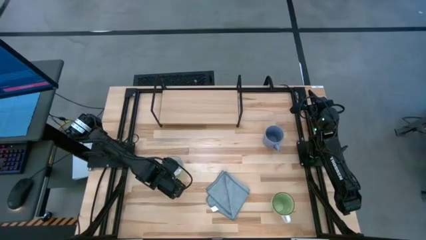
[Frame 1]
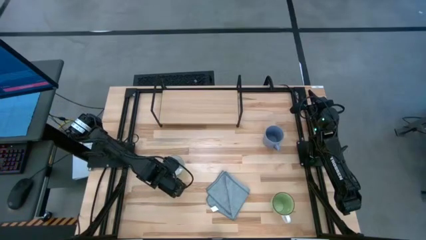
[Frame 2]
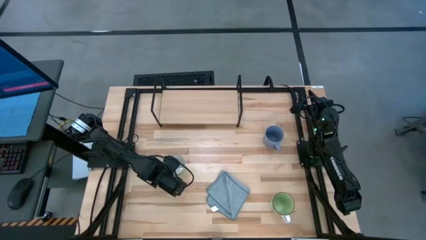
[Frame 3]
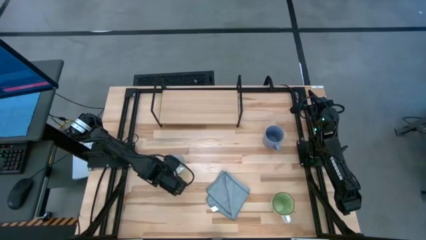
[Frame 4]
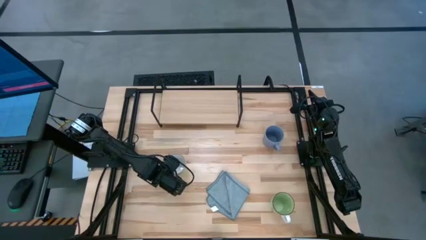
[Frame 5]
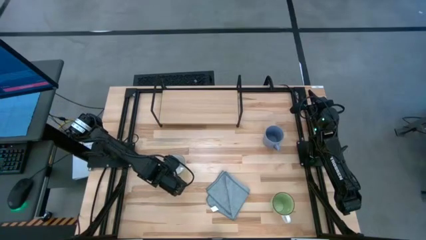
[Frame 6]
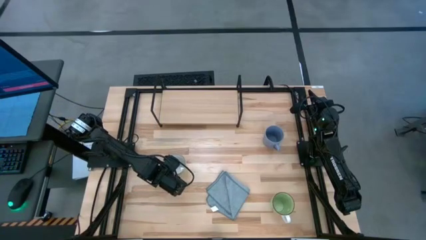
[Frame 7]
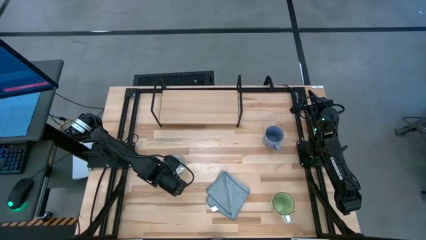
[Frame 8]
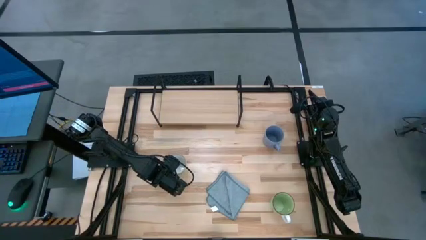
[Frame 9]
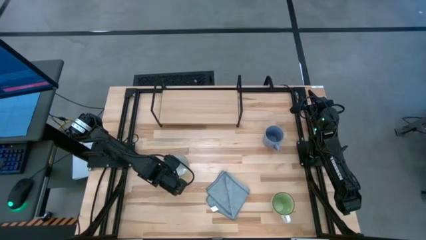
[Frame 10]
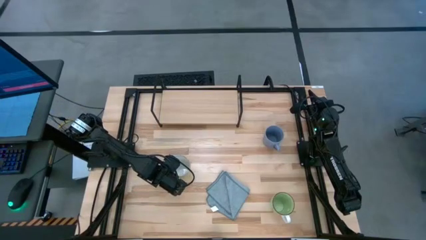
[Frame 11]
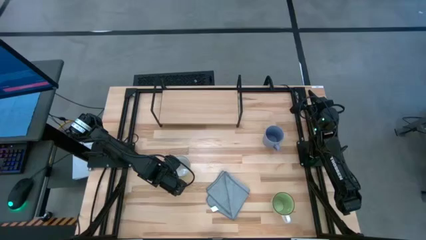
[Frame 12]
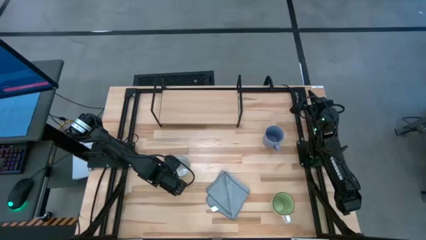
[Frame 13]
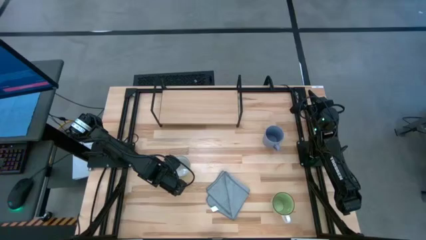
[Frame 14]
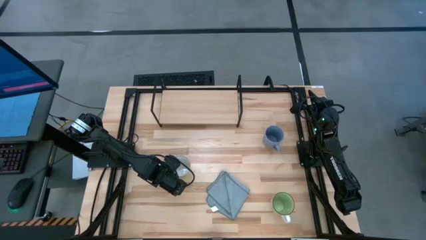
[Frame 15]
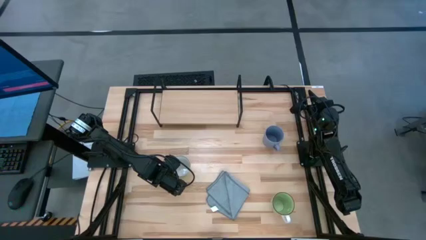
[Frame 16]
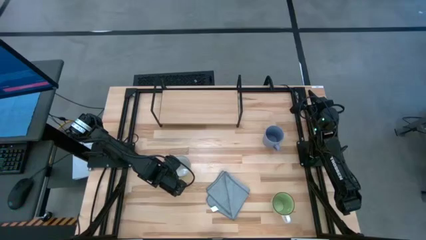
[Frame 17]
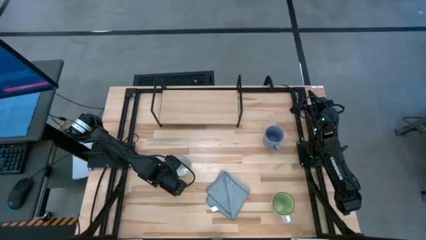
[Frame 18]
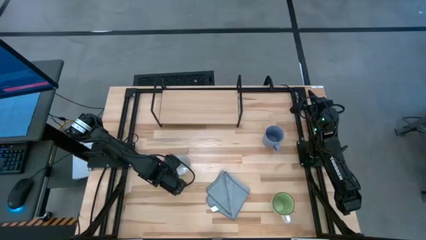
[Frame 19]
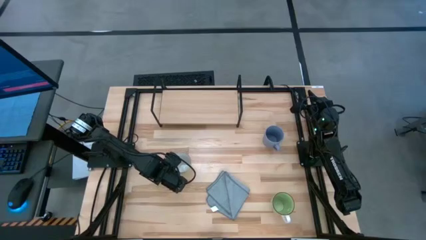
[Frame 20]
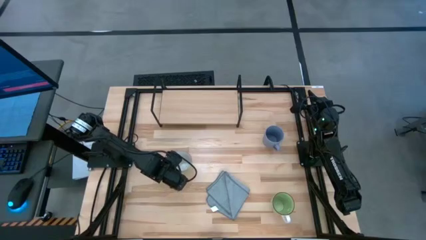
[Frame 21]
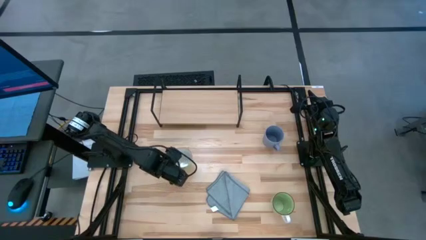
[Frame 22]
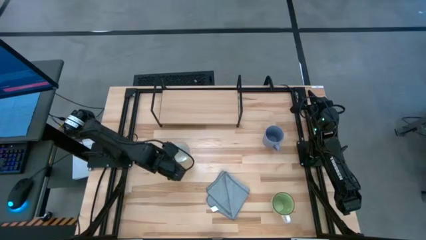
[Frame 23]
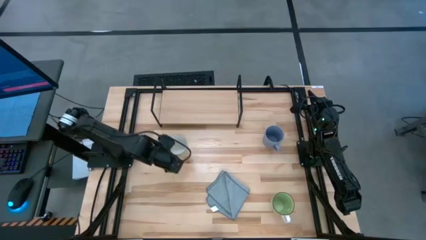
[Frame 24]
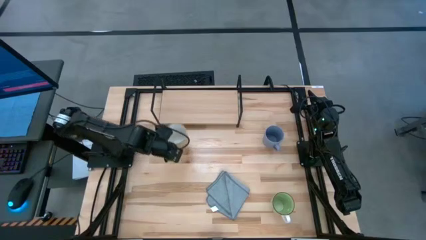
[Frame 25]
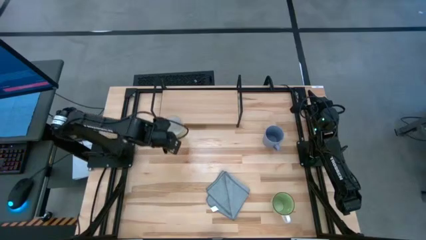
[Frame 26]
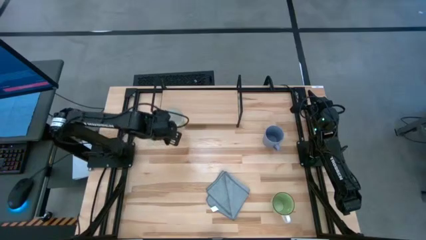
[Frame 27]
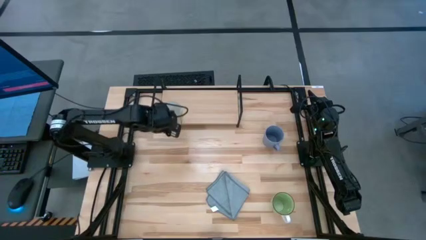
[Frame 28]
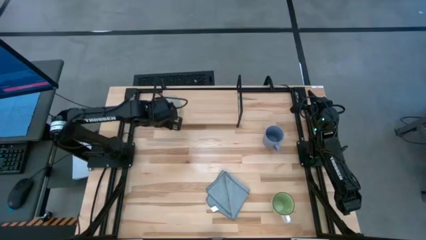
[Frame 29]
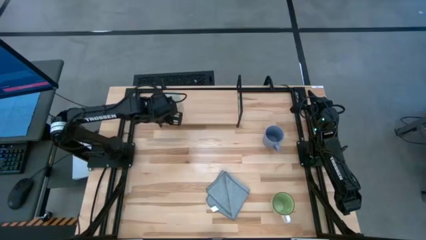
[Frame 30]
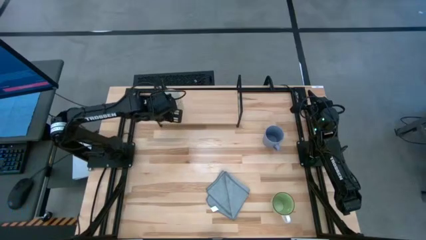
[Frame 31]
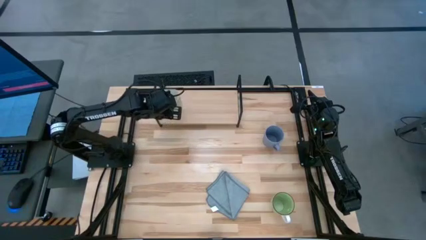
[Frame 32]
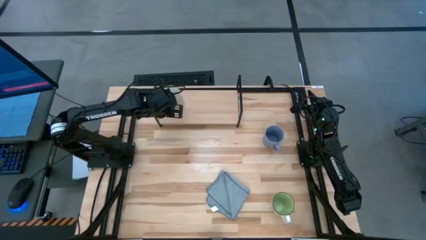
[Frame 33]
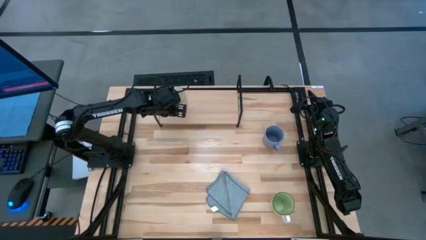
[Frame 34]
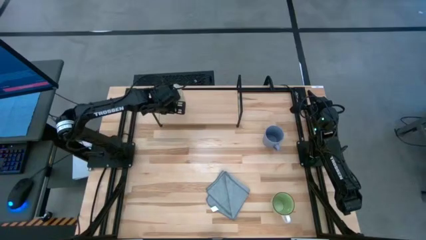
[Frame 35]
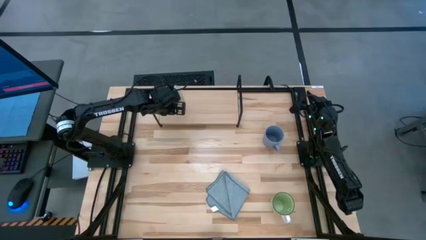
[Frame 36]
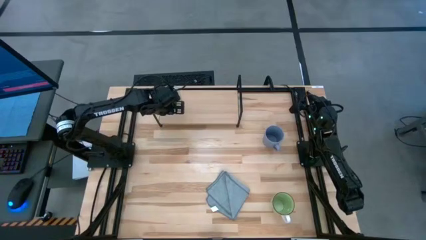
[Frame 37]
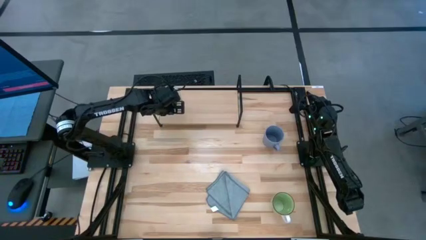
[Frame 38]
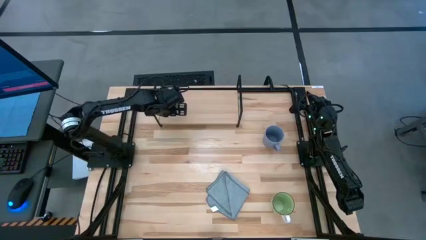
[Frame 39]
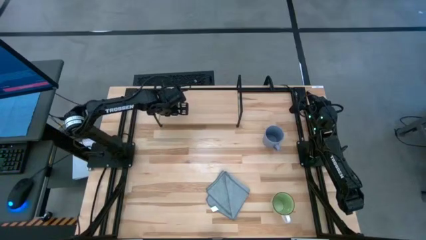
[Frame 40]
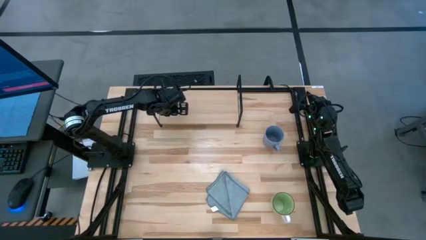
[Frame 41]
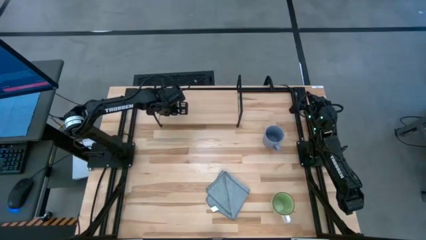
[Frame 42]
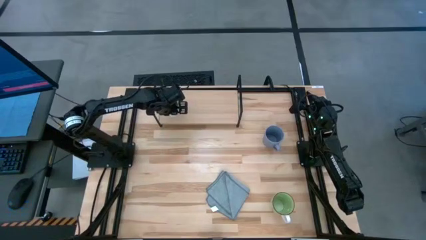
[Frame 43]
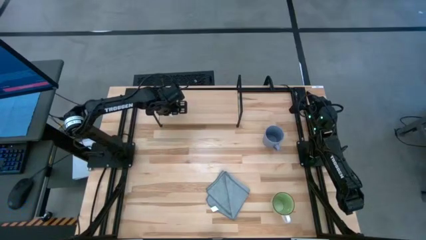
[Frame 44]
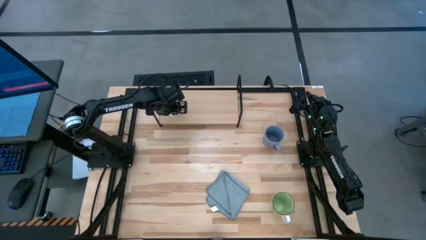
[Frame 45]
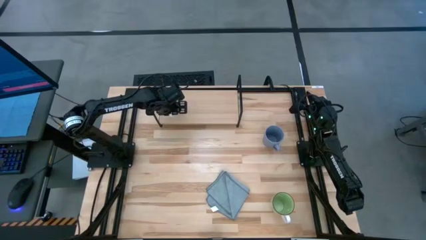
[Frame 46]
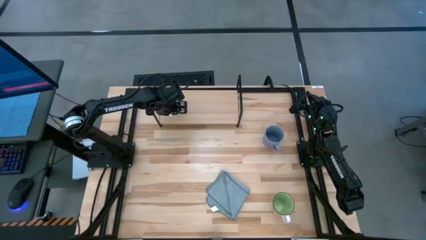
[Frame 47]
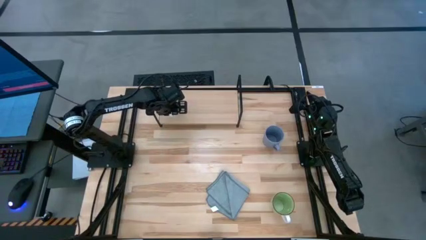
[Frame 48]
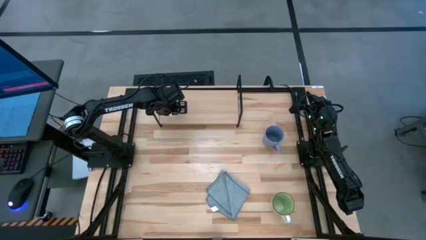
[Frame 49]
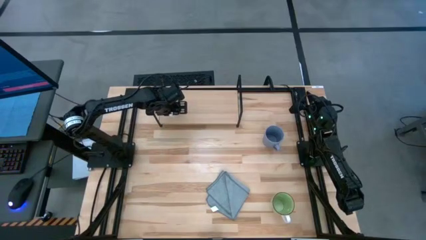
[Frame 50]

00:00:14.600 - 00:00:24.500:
Task: Stack small to large cups/mugs on shelf
Put the green mug on the shelf

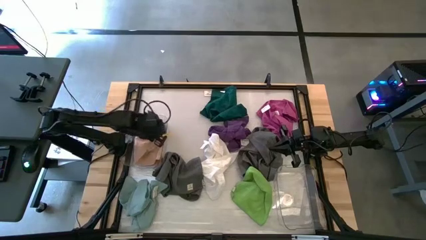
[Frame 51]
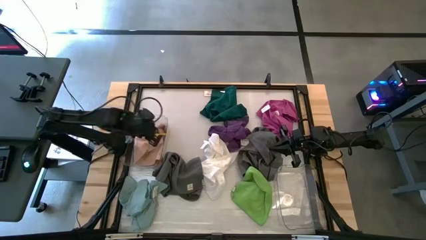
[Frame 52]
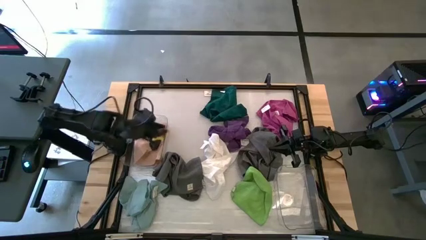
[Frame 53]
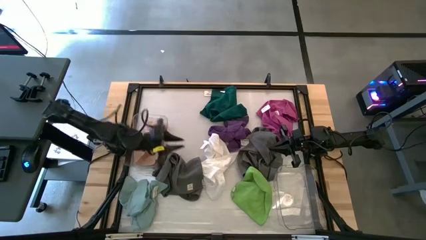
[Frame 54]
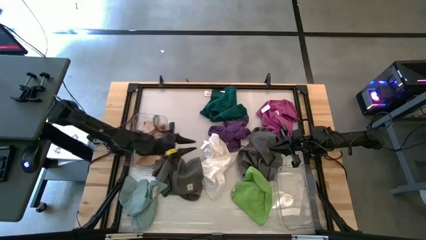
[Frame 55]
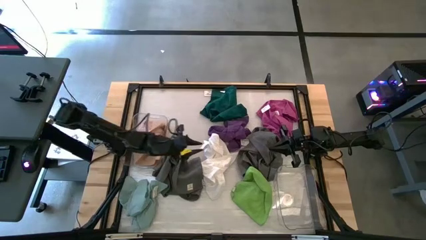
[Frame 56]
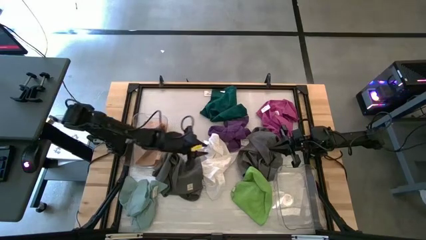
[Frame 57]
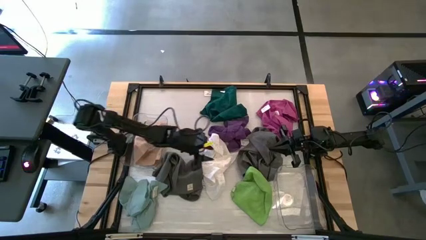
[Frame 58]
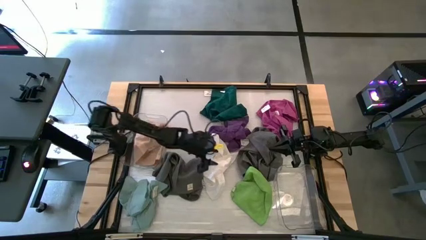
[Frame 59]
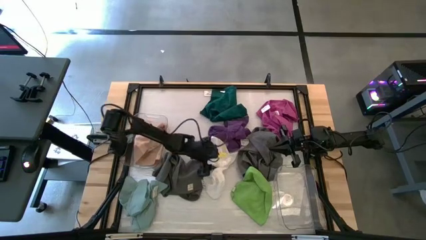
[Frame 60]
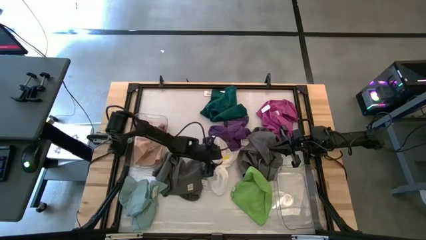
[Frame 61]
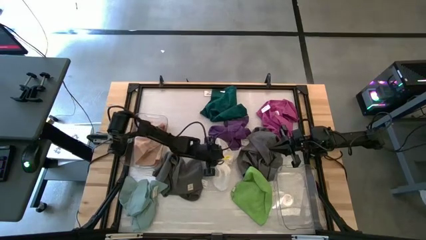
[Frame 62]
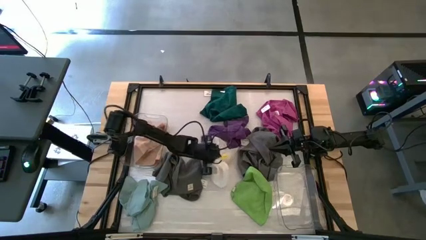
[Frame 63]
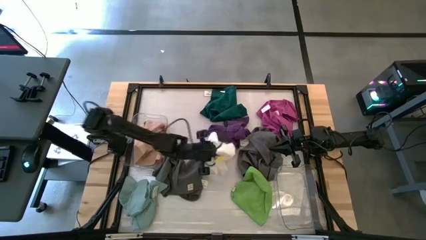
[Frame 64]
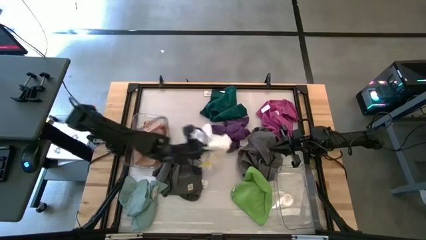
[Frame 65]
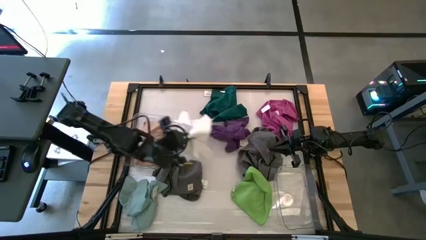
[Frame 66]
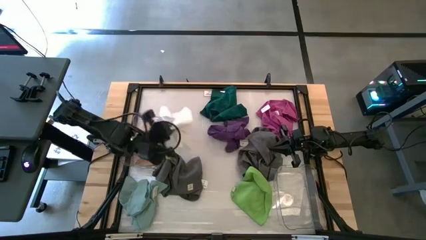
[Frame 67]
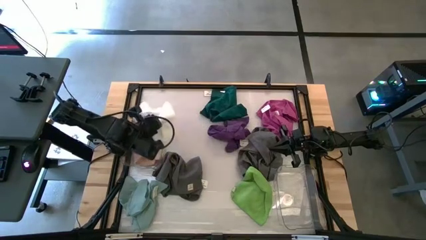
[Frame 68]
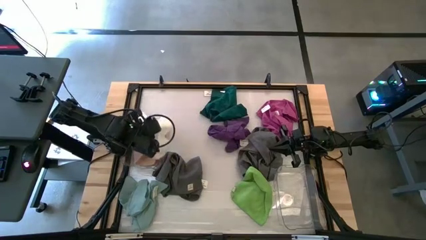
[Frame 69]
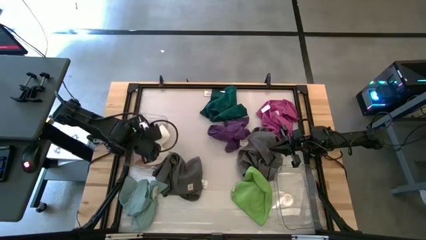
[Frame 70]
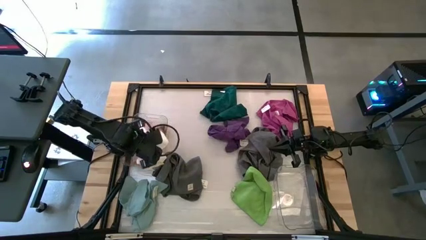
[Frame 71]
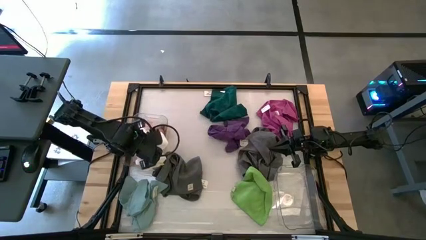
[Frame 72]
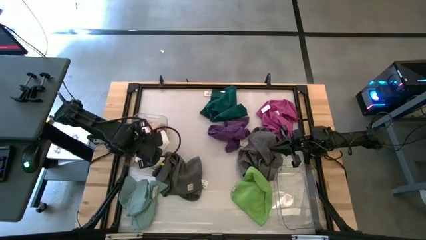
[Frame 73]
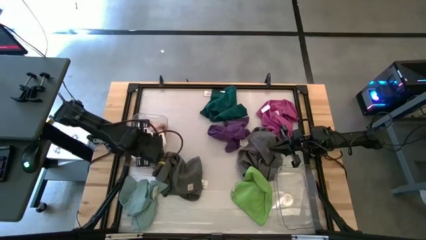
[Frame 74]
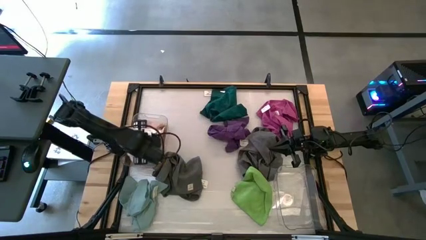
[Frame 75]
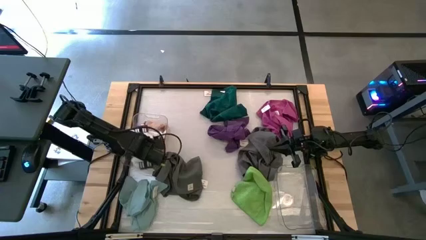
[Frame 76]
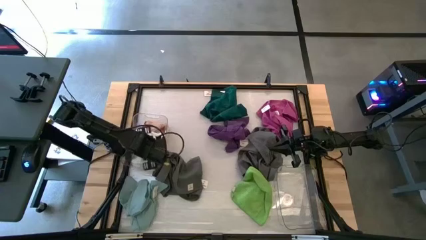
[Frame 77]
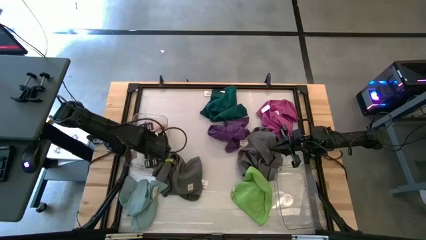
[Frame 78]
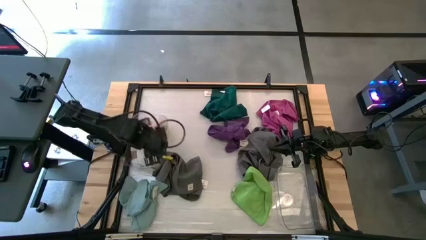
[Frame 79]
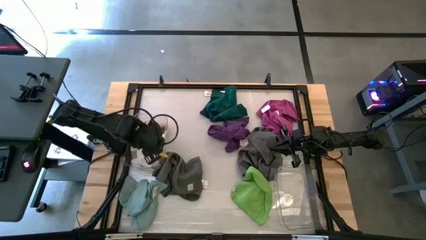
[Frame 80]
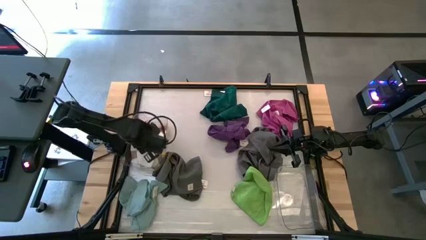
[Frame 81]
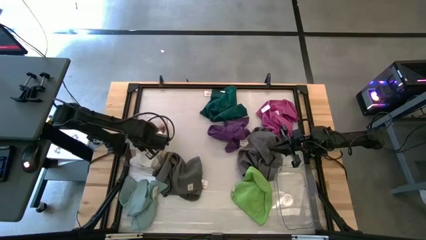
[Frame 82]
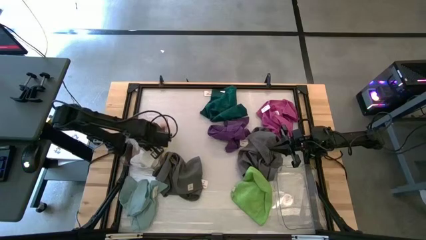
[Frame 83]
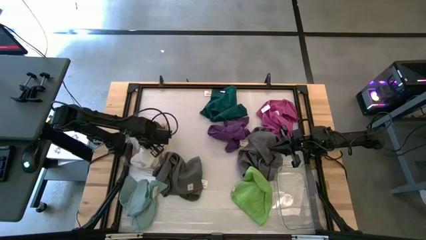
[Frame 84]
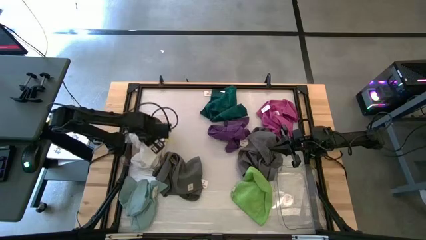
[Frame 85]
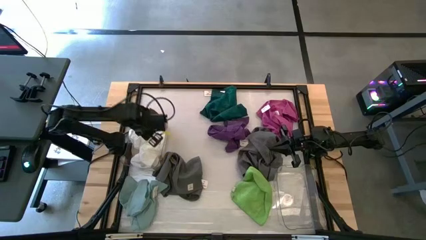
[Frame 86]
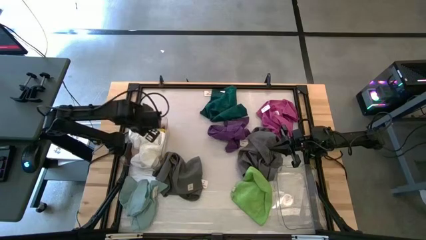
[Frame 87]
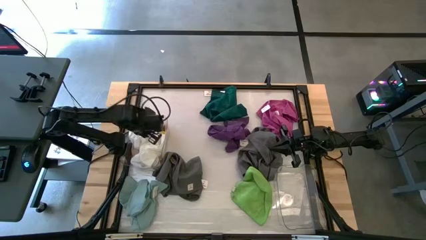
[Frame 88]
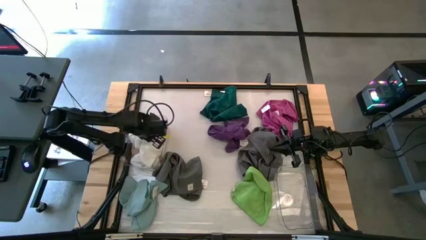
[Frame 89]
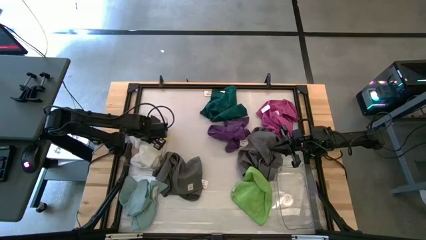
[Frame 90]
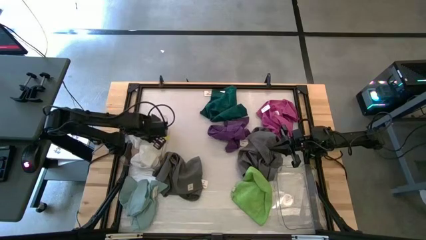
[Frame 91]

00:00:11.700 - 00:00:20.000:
Task: Sort towels by color in basket
Put the white towel into the left transparent bin
